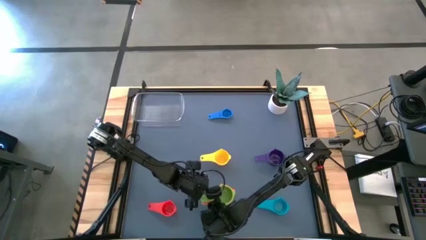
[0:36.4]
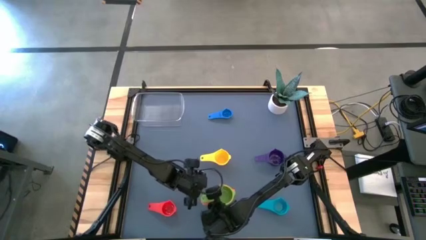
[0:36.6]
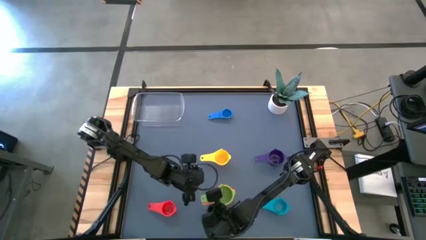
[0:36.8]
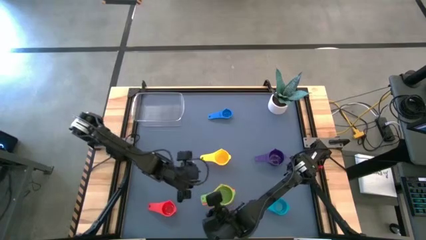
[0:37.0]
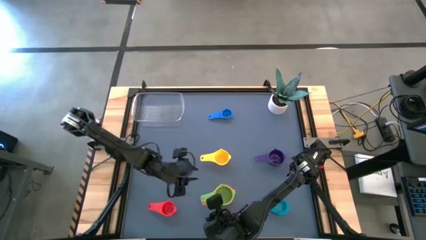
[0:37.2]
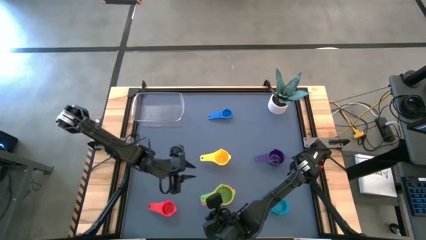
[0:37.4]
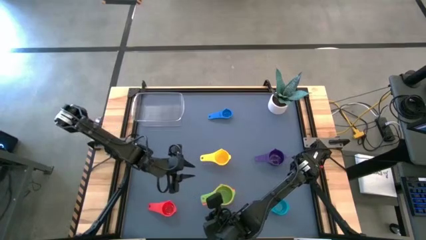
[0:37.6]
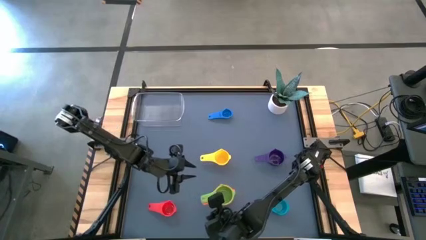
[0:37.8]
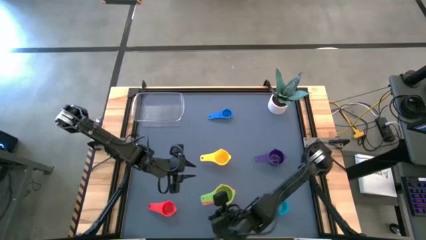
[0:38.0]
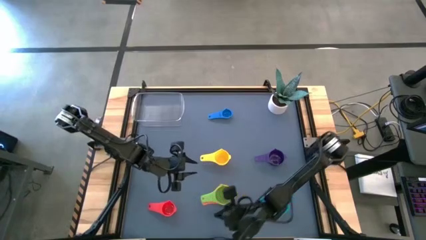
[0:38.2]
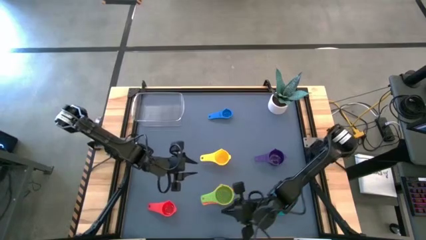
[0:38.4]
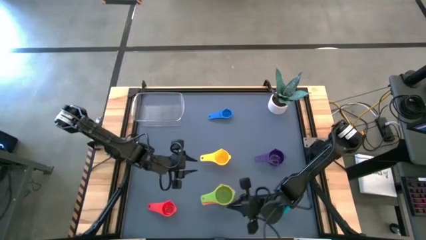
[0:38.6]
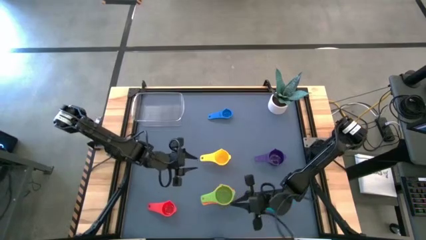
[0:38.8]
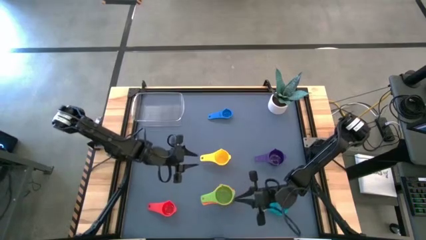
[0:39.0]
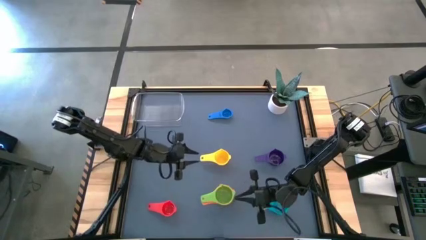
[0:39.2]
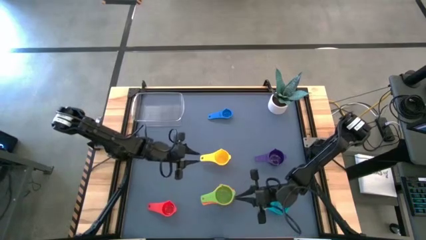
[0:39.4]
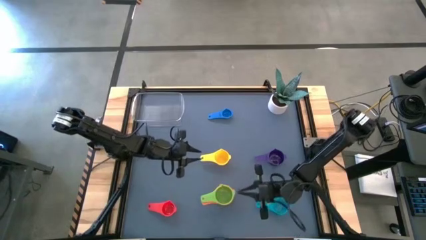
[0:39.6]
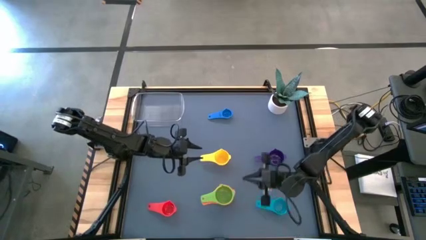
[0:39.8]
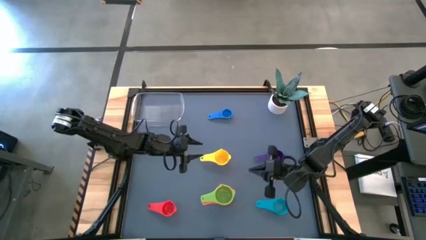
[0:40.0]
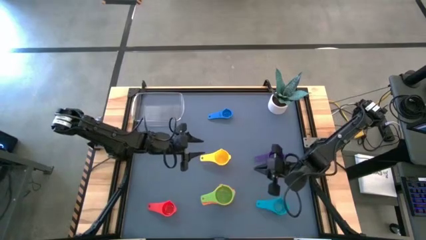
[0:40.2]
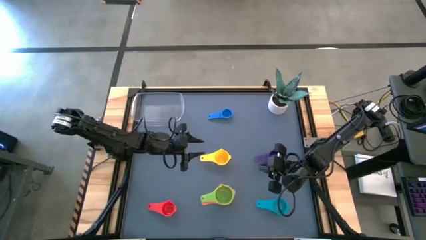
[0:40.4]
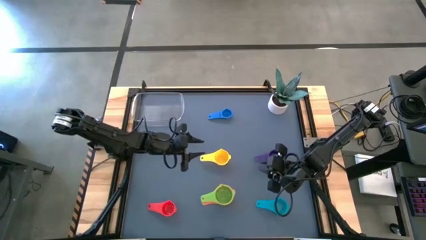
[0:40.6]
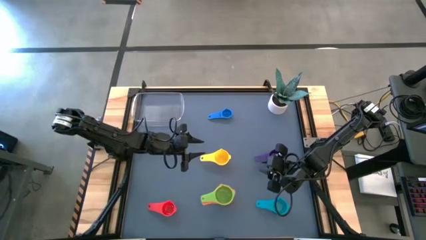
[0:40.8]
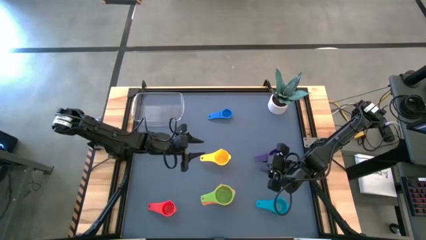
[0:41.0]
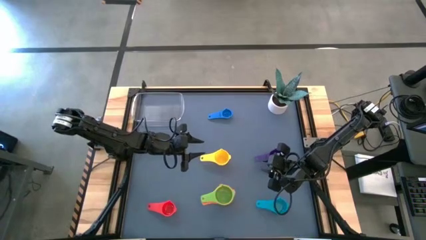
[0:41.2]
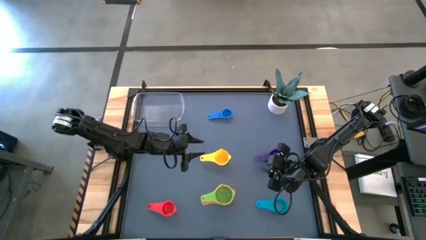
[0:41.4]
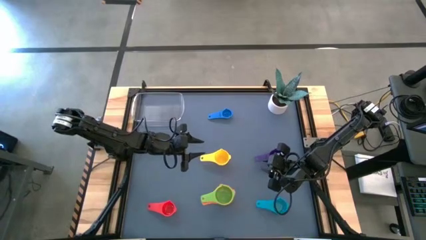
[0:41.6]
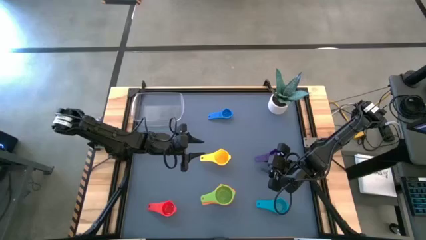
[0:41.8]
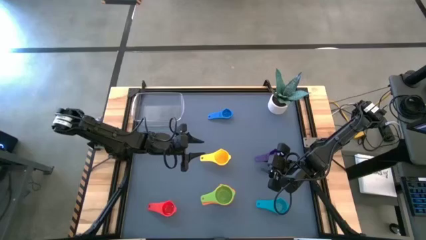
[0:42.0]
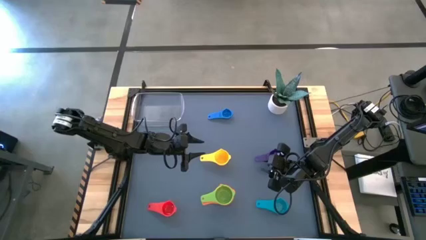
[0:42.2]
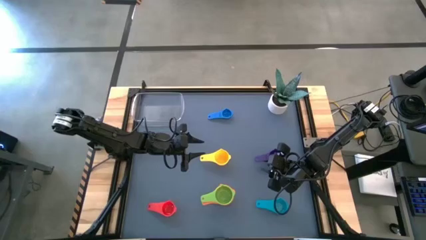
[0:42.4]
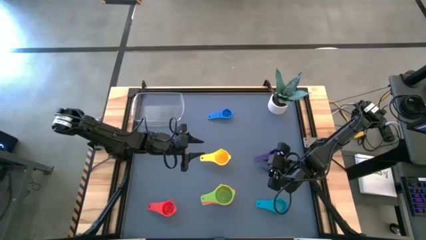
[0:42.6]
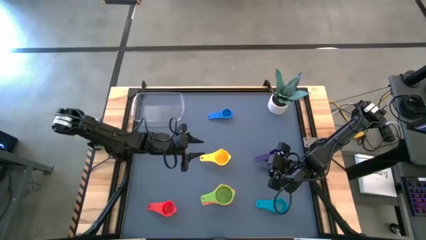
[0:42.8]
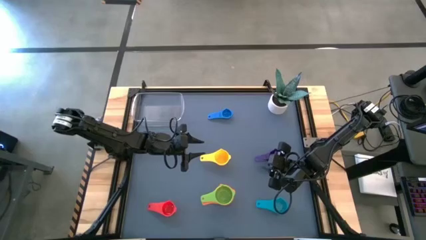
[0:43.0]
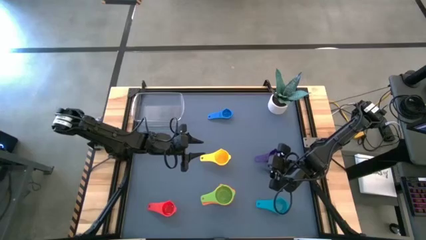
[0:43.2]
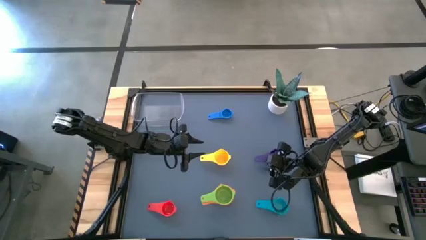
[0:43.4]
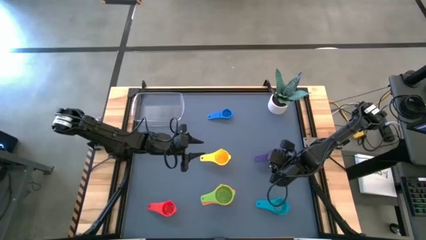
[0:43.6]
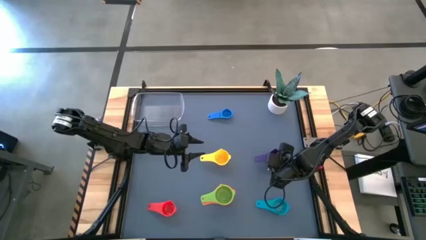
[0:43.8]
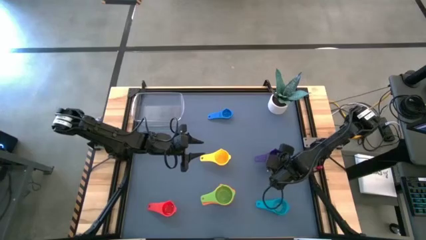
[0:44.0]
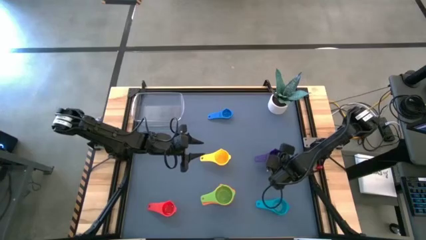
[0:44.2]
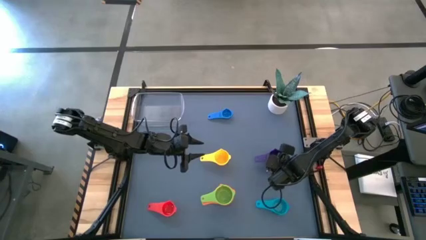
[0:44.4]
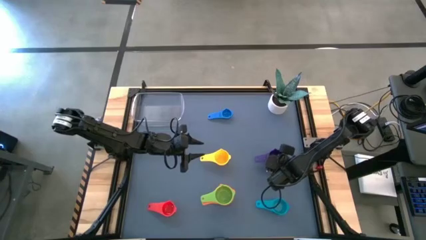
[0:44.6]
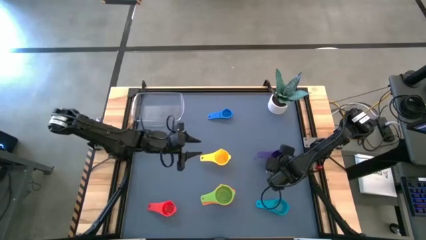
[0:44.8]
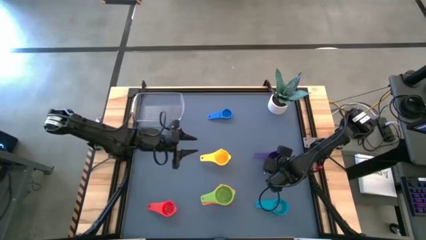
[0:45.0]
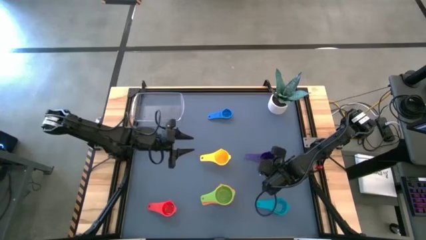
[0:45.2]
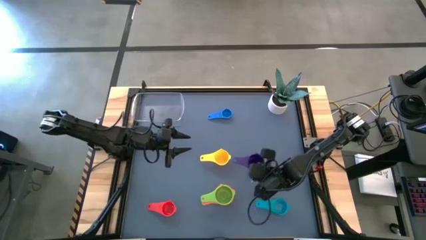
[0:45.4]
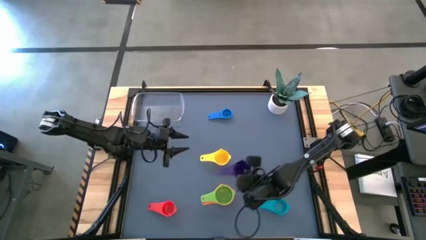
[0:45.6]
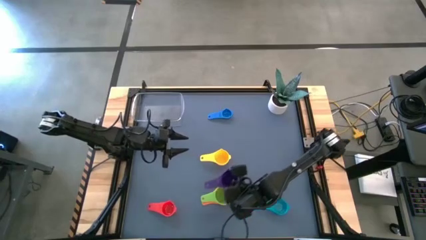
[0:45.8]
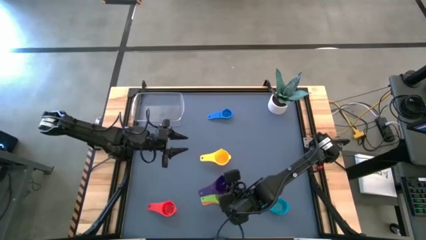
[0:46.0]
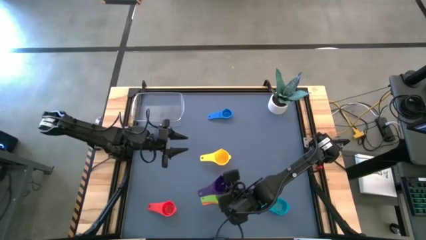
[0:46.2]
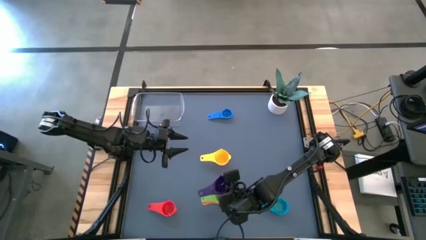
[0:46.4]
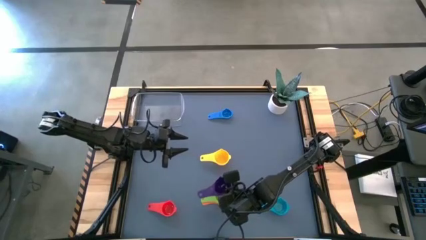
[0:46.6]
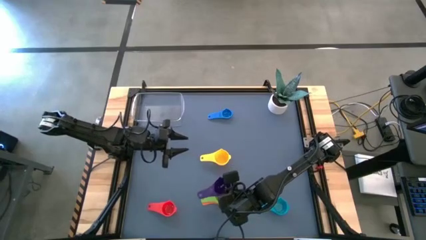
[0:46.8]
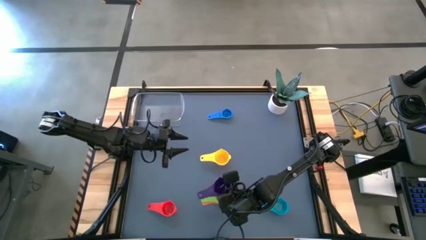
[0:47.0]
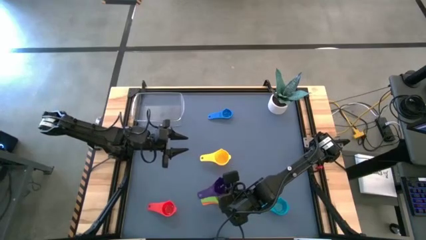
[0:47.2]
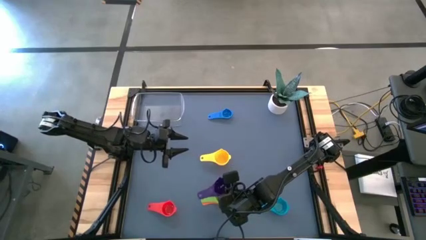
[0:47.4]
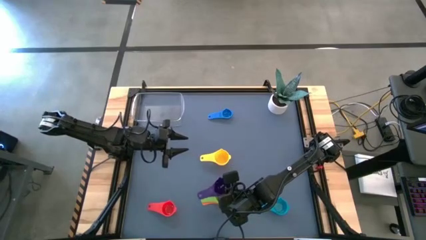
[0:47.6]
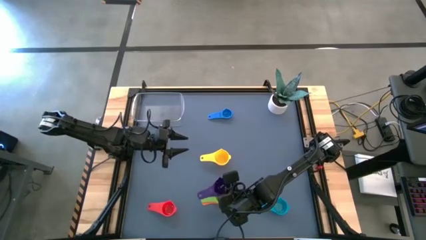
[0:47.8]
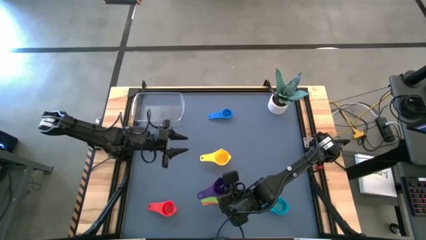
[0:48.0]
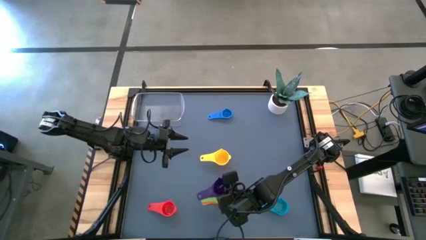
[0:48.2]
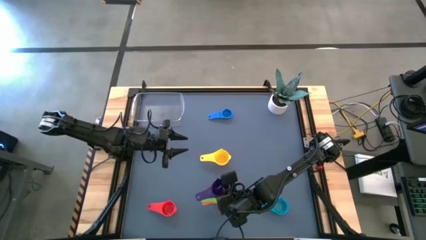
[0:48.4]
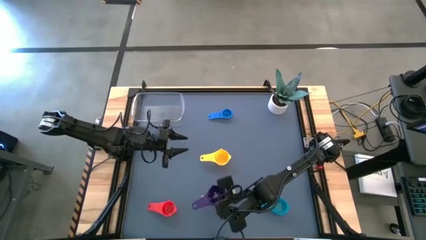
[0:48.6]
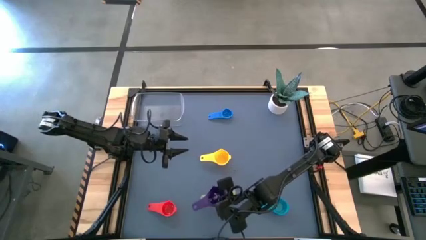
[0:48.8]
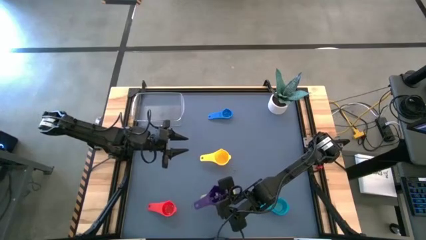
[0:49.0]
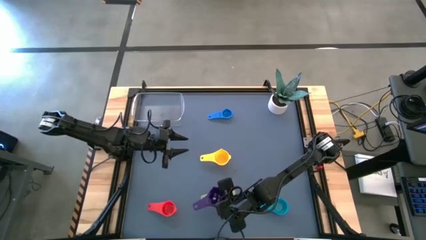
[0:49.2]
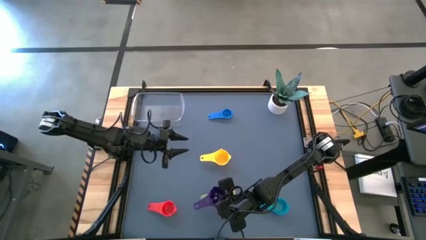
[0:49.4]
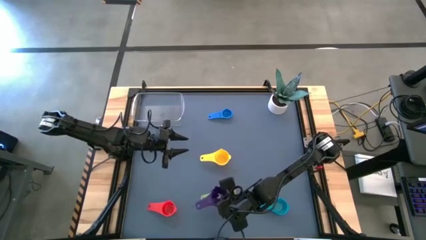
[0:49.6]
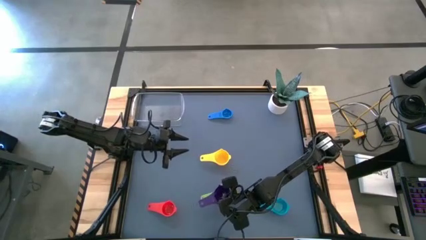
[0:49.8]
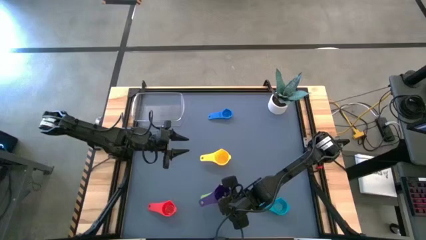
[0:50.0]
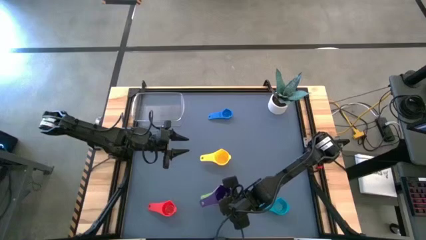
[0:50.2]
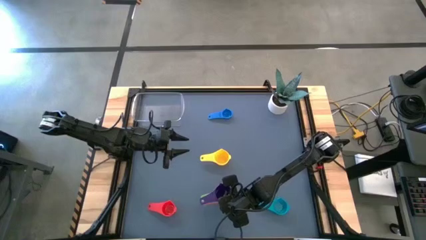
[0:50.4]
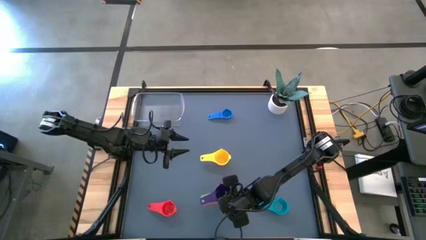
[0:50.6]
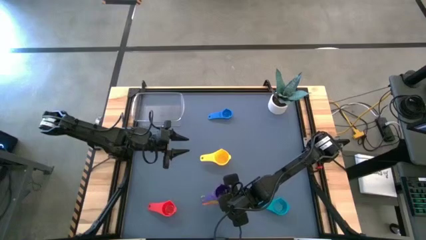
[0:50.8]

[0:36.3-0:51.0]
Task: Nest measuring cups in basket
Stack the violet measuring cup on top of the green measuring cup
